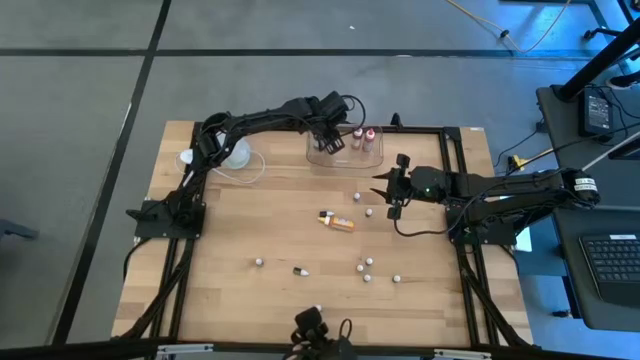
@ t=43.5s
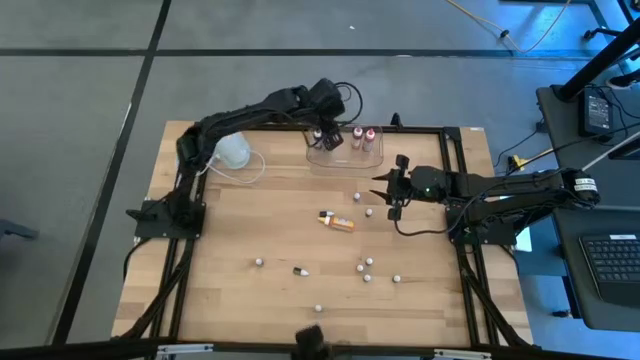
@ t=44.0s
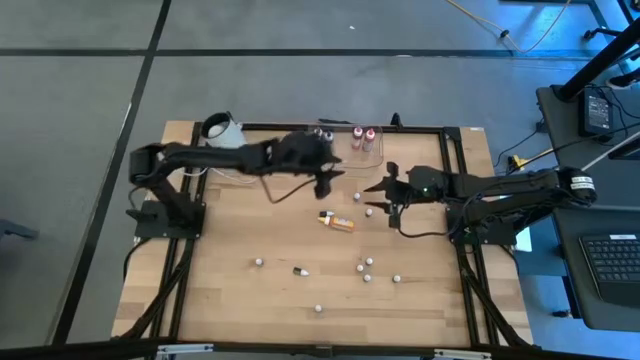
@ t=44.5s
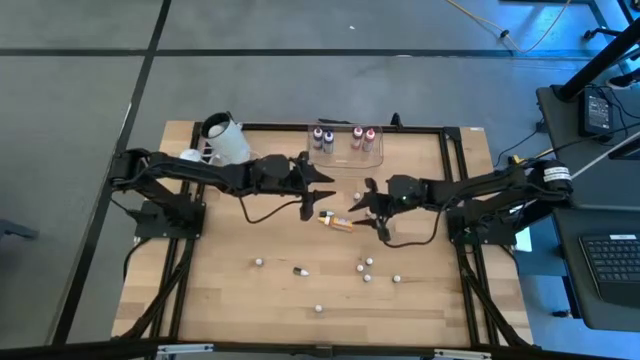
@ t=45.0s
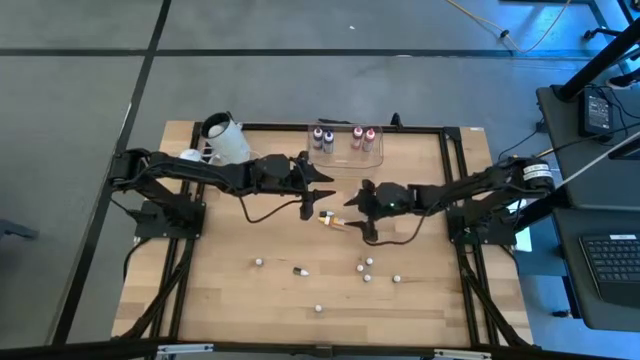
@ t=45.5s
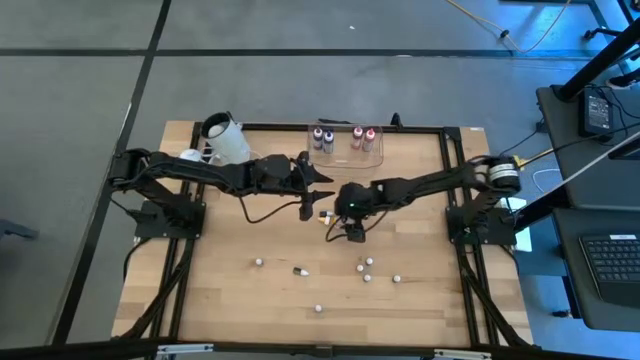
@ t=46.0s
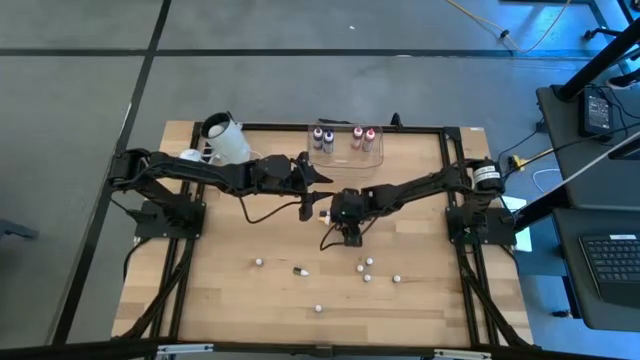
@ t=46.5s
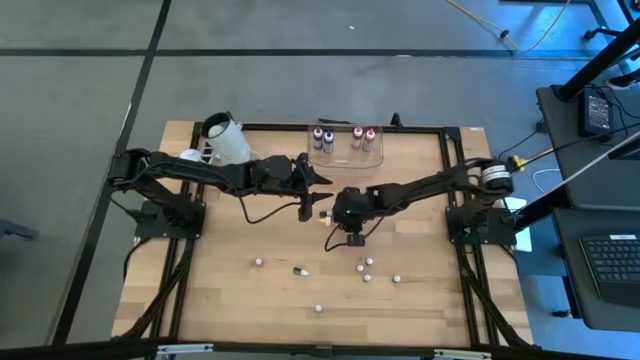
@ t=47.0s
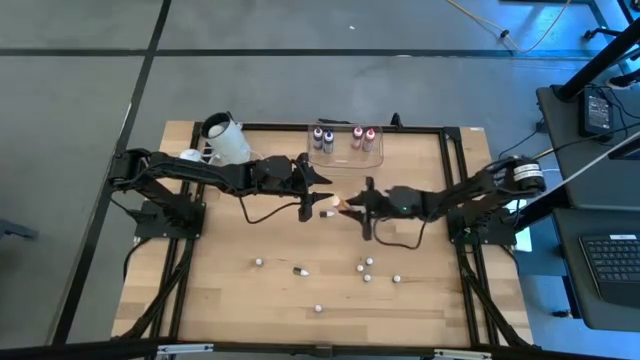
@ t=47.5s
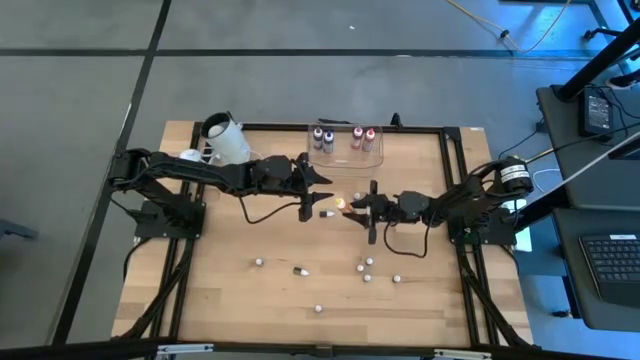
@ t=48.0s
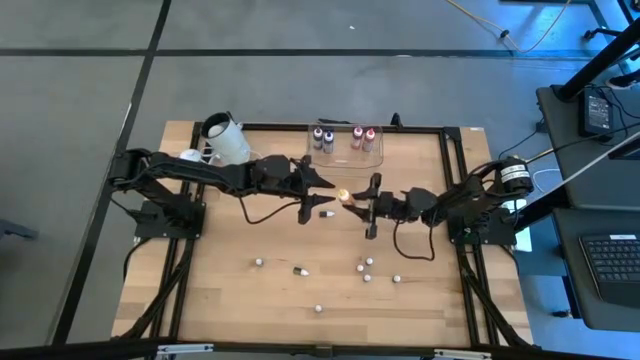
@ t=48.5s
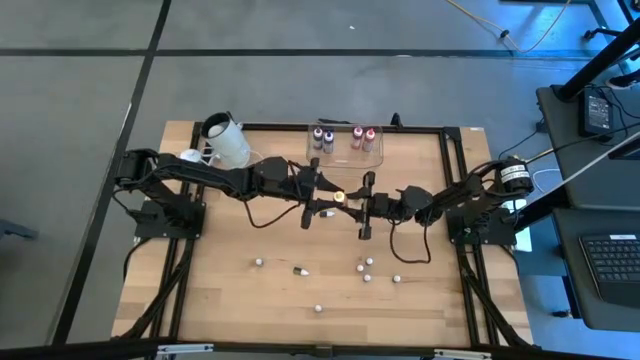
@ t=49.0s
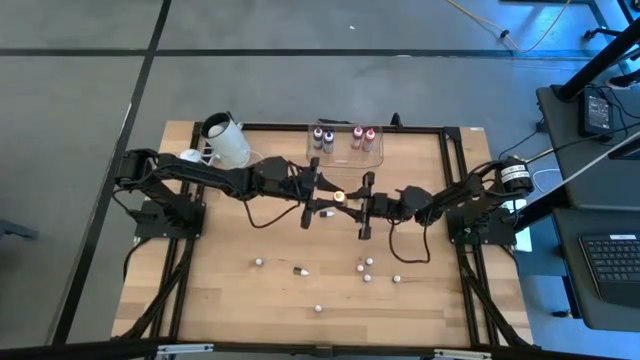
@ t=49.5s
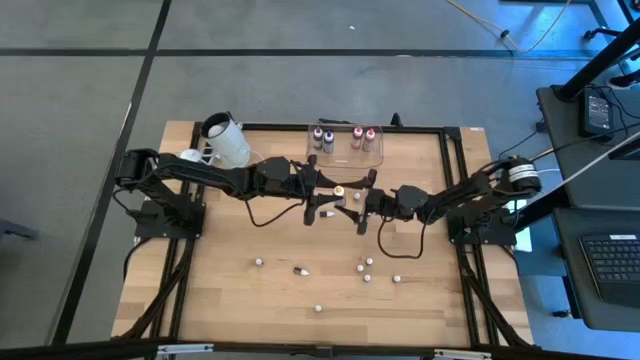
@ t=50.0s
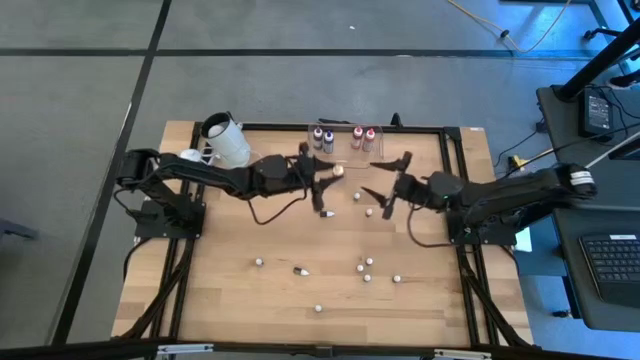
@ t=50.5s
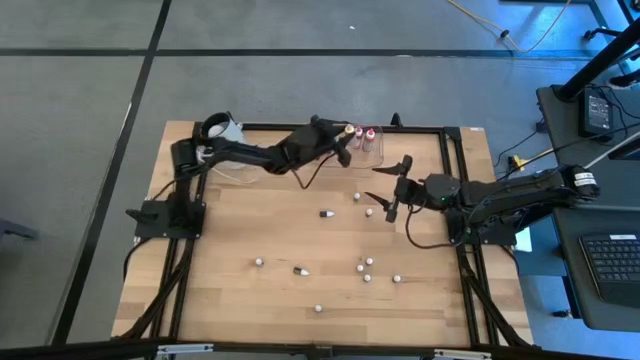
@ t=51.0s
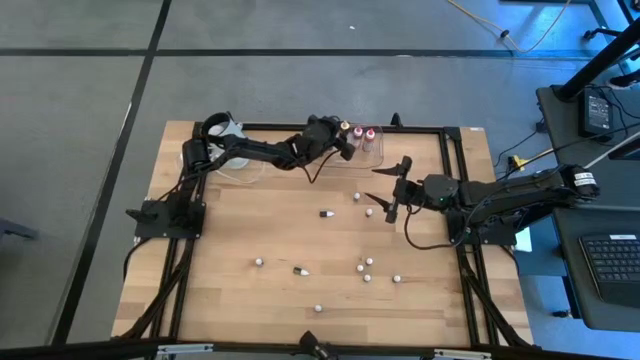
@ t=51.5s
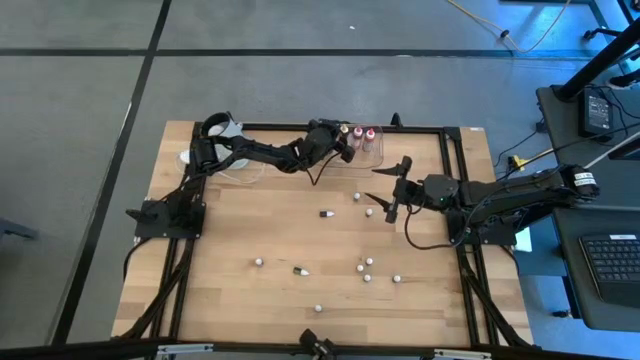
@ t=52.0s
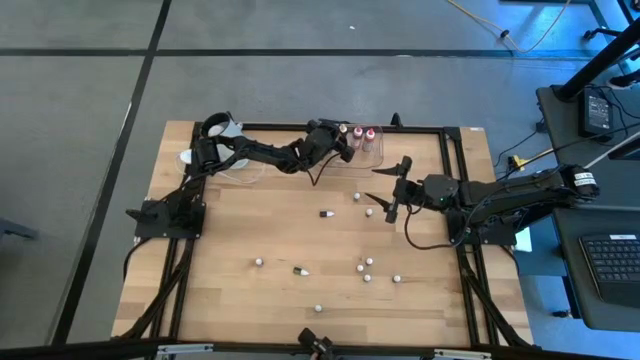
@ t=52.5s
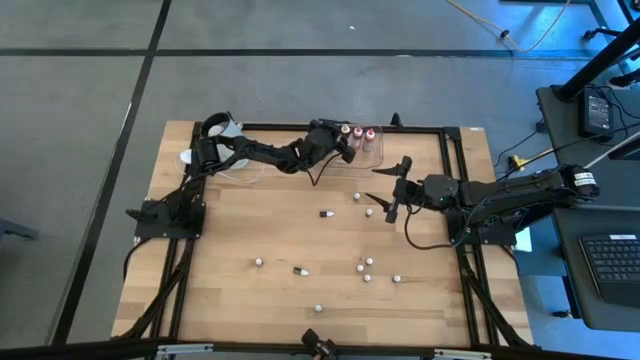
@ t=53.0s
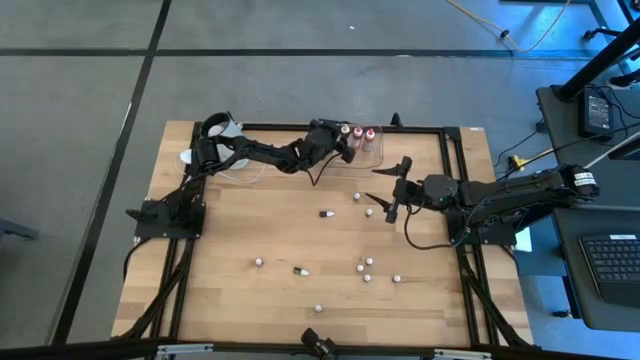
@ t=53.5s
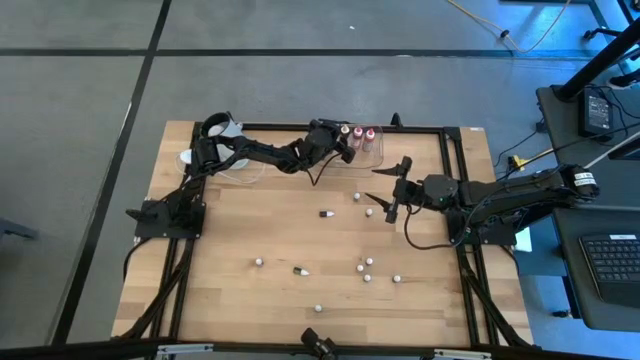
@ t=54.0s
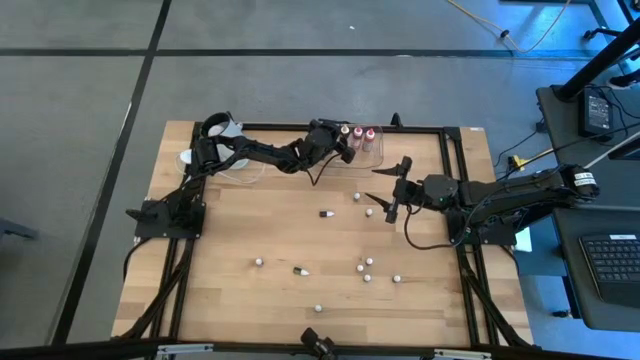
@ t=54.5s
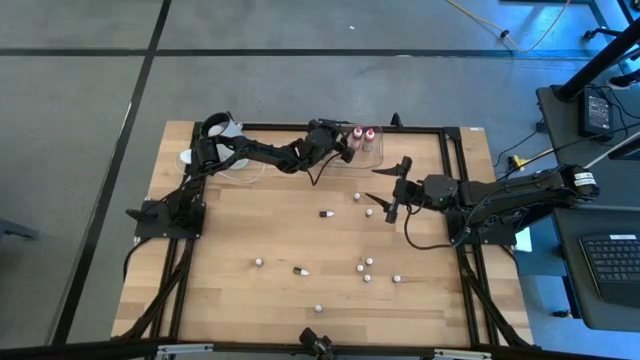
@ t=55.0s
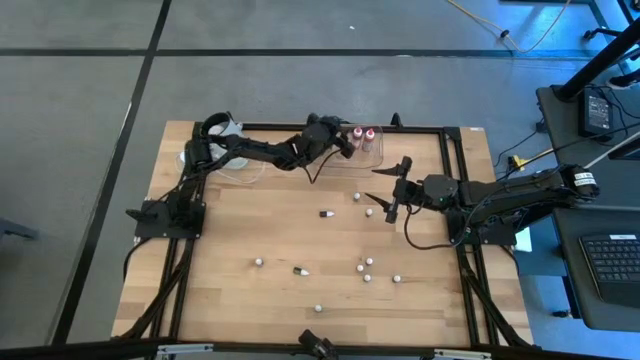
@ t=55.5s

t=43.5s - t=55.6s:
Task: Pick & Place food coloring
Put the large yellow food coloring bottle into the transparent container

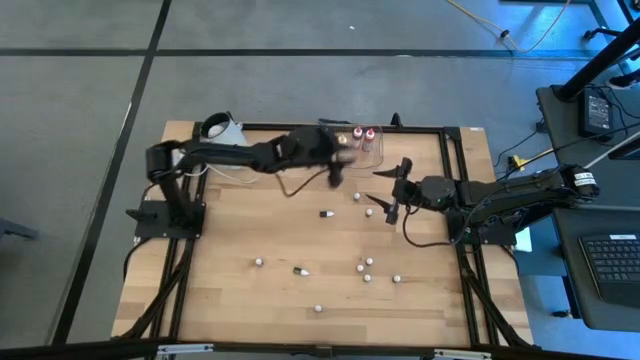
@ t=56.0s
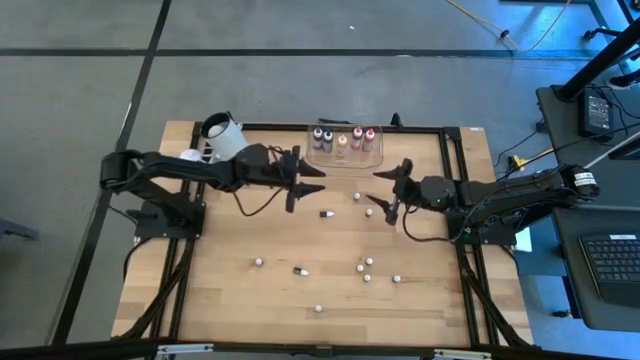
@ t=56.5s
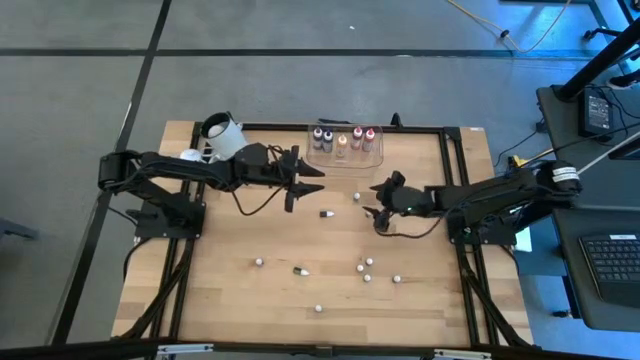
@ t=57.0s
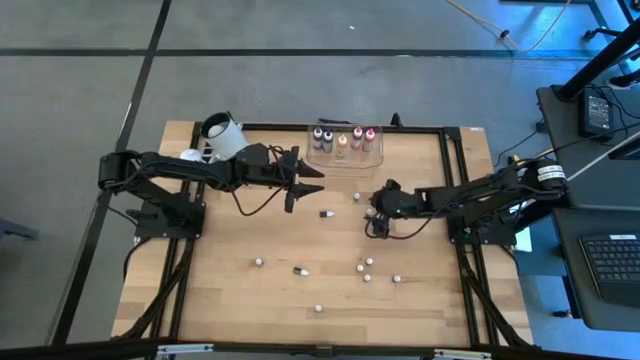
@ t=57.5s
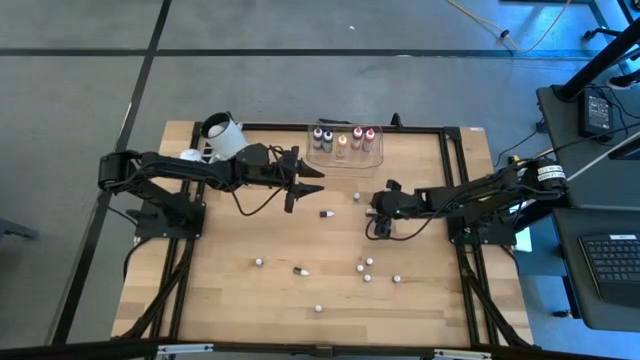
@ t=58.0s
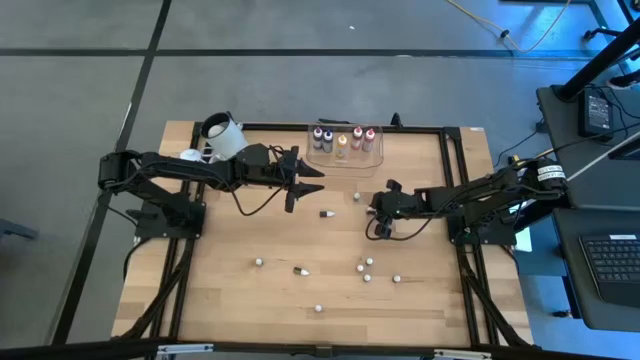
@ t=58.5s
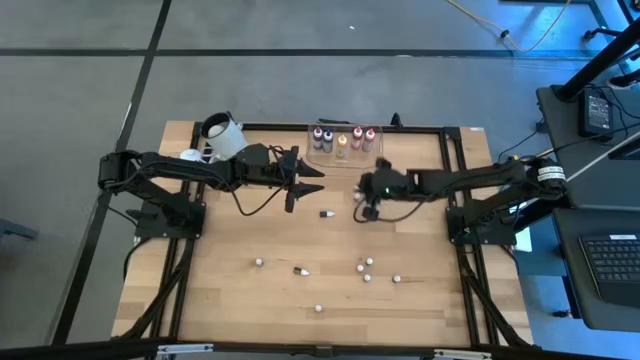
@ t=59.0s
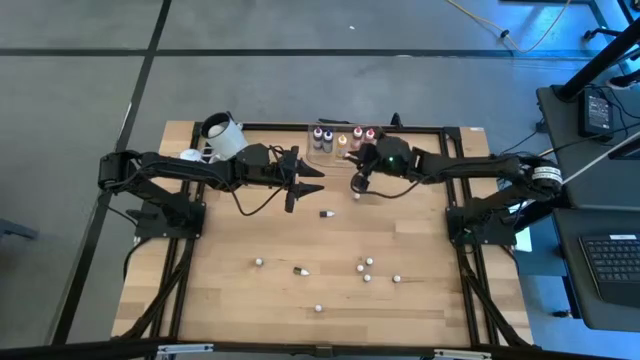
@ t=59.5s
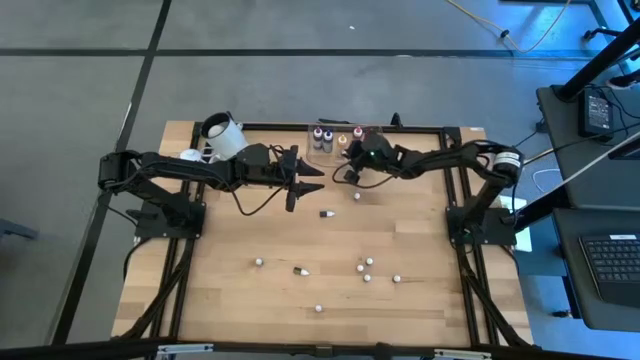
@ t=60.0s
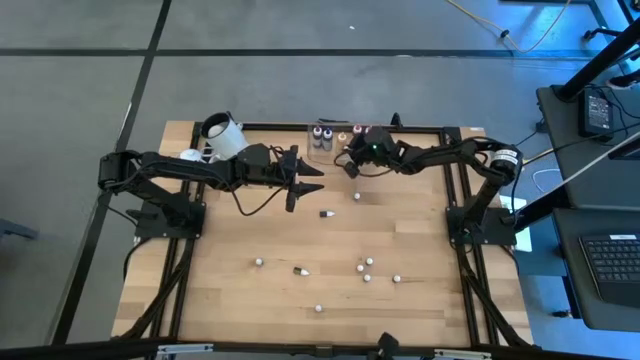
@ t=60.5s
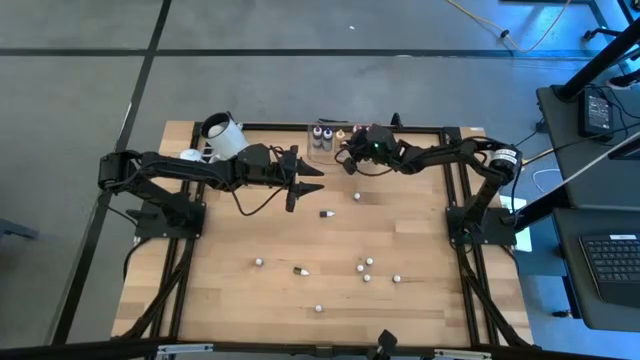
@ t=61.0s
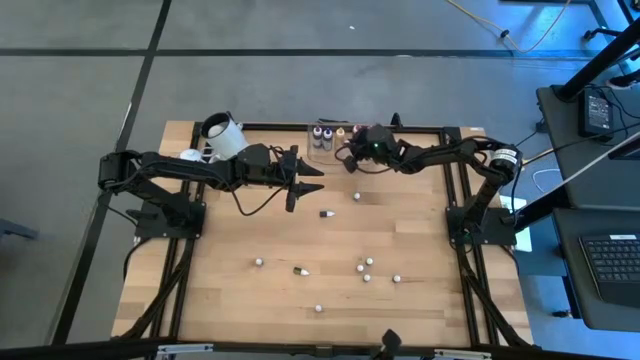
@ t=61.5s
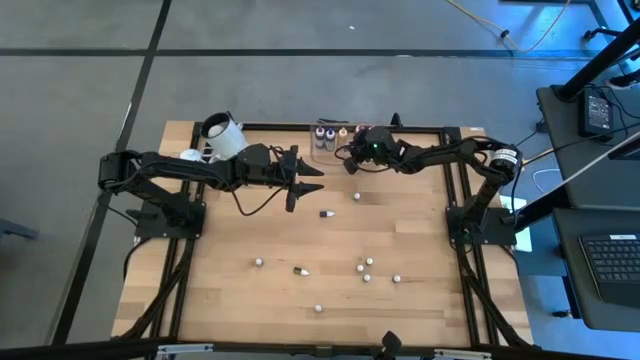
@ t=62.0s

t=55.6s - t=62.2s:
Put the small pink food coloring bottle into the transparent container

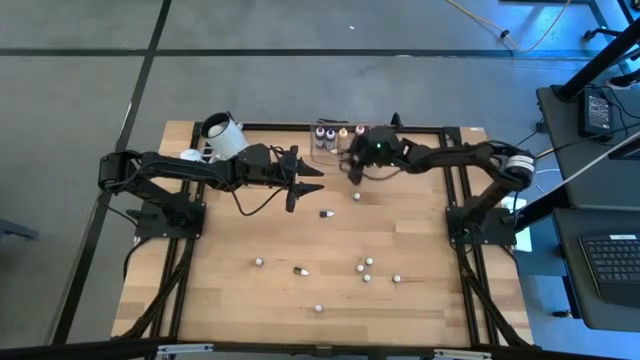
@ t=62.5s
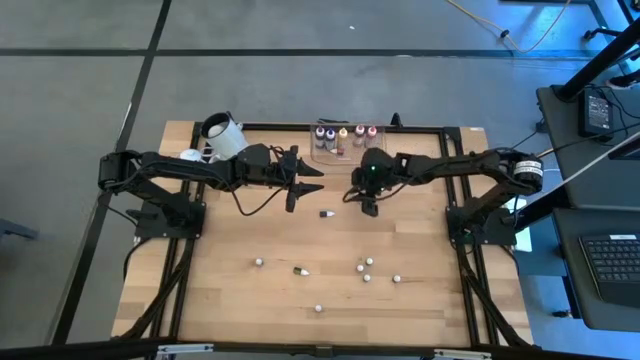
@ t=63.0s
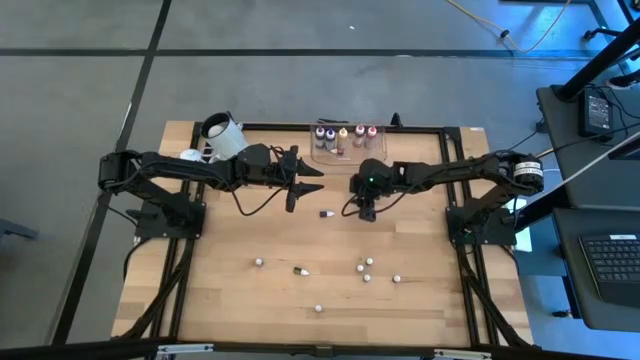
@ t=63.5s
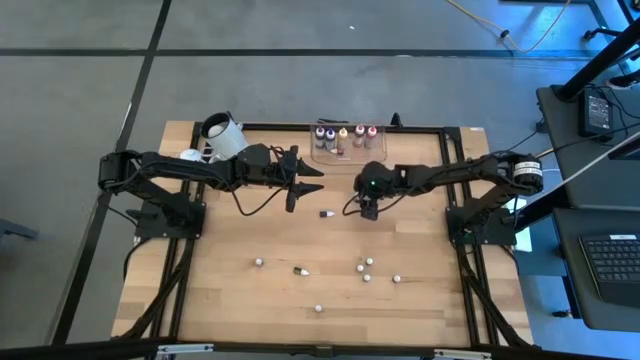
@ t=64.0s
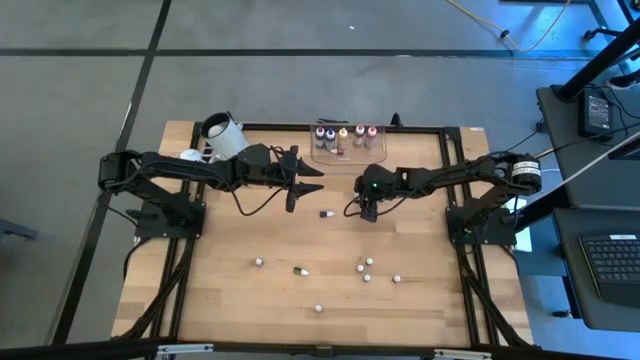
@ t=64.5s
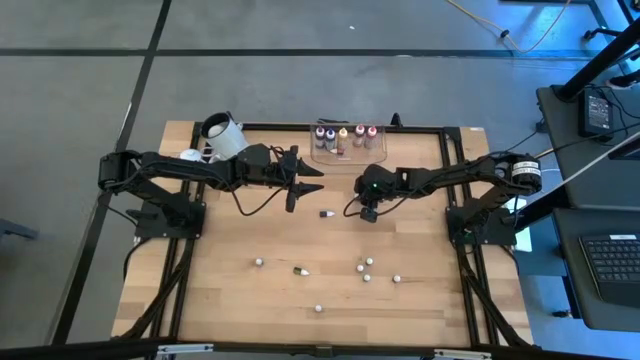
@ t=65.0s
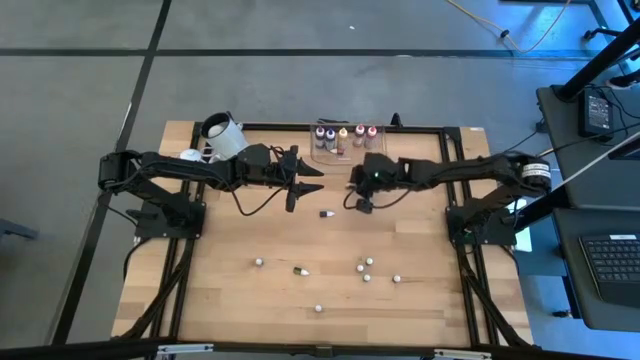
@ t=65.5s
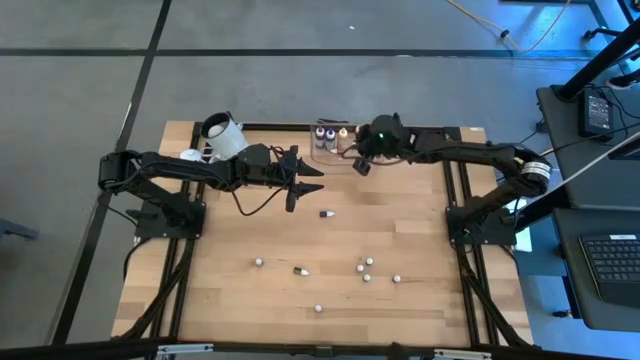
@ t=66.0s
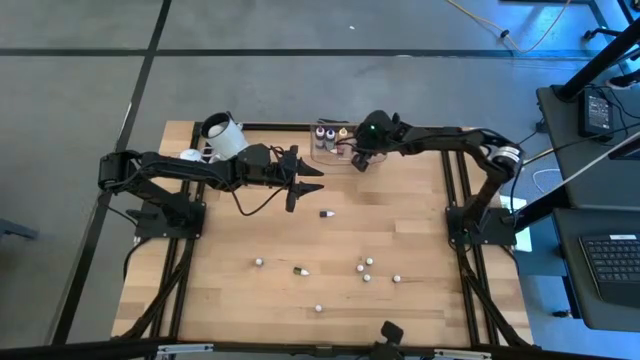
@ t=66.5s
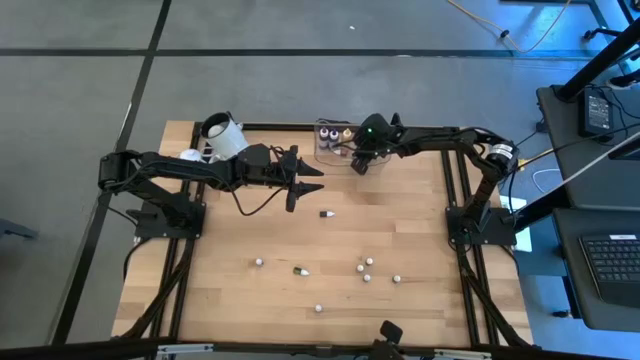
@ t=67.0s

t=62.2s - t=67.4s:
Put the top small blue food coloring bottle into the transparent container
